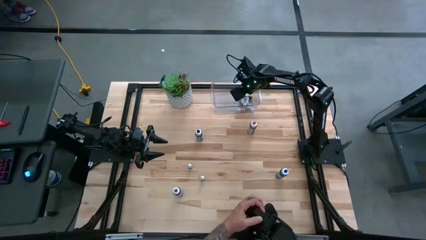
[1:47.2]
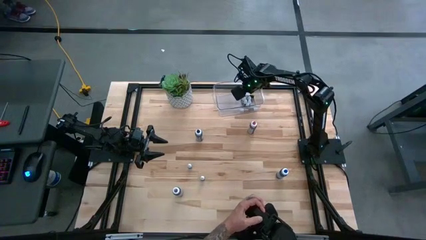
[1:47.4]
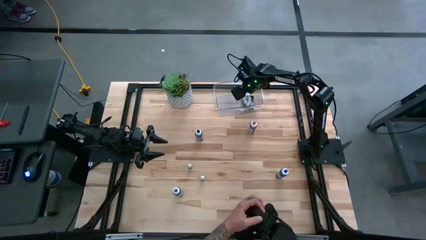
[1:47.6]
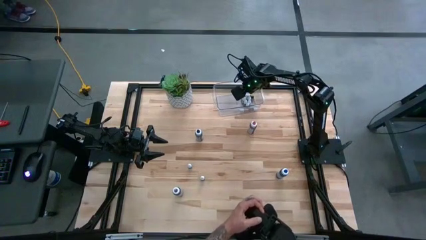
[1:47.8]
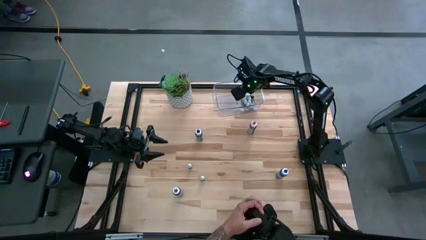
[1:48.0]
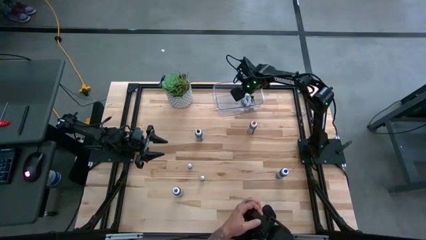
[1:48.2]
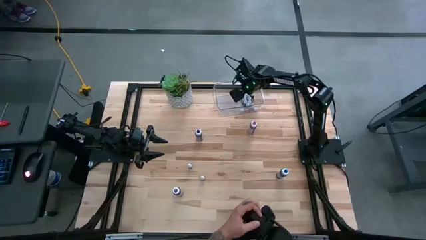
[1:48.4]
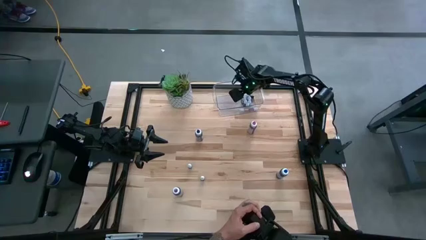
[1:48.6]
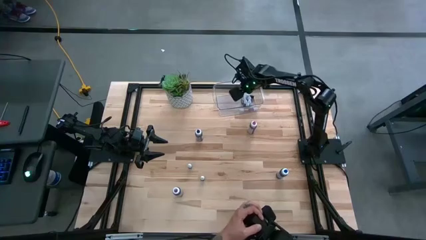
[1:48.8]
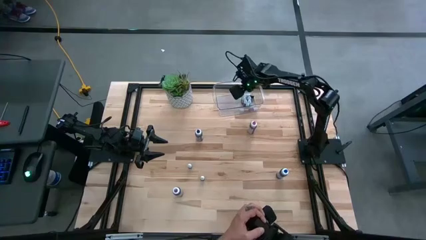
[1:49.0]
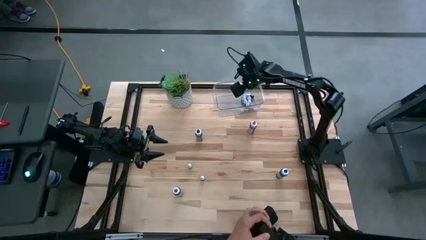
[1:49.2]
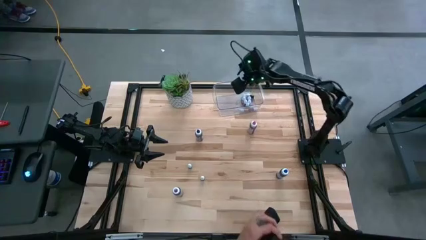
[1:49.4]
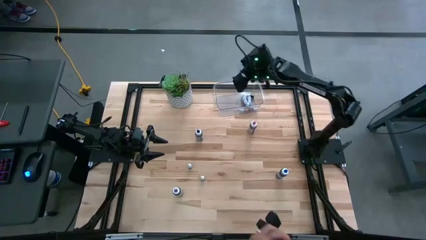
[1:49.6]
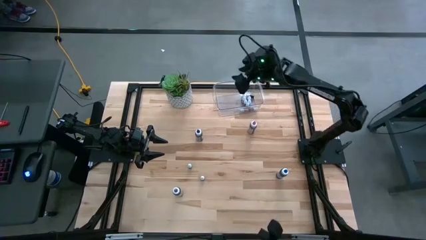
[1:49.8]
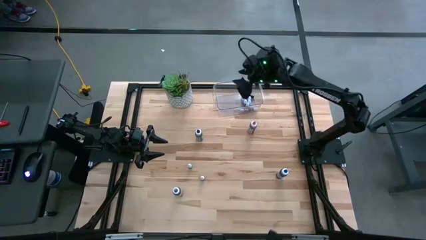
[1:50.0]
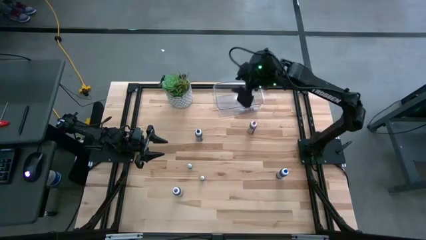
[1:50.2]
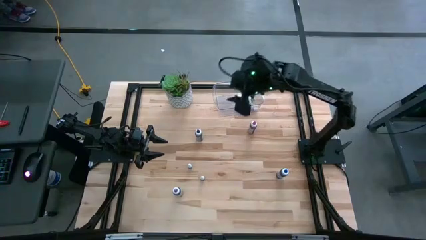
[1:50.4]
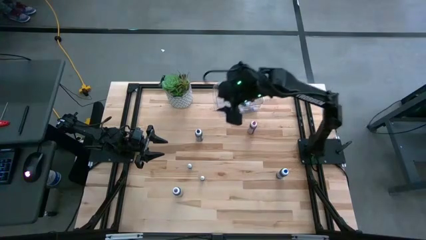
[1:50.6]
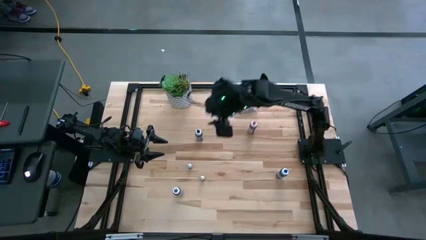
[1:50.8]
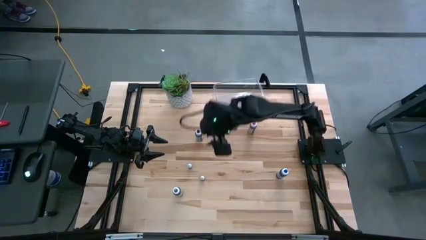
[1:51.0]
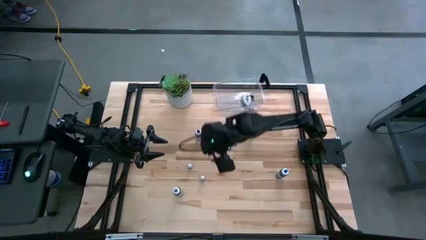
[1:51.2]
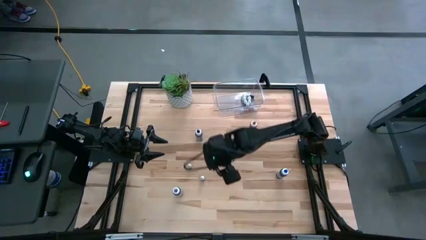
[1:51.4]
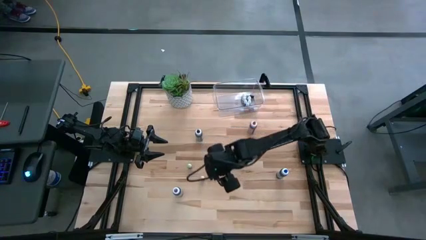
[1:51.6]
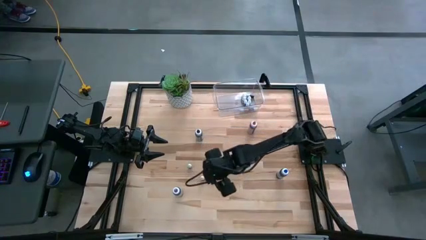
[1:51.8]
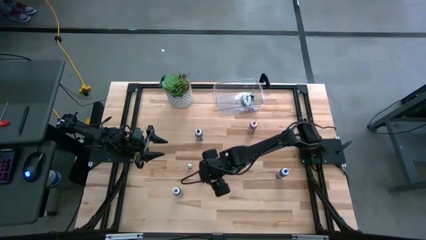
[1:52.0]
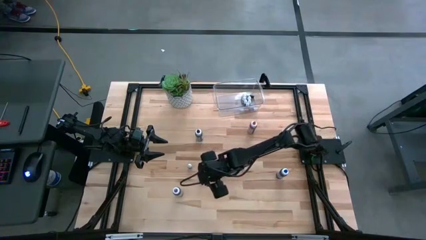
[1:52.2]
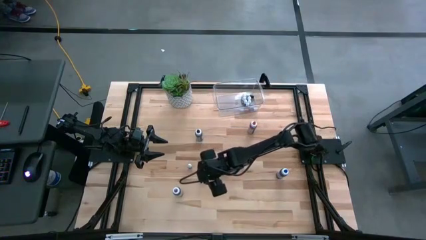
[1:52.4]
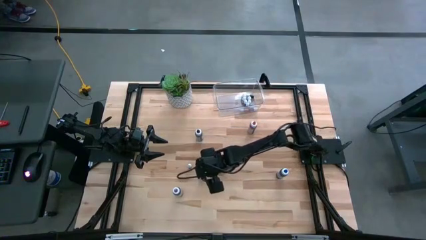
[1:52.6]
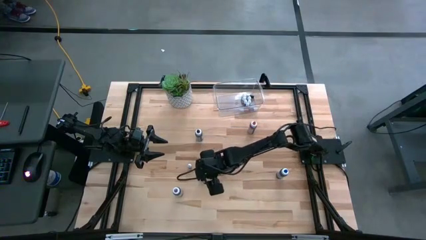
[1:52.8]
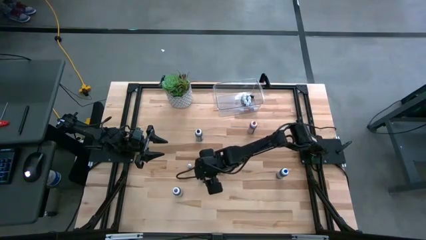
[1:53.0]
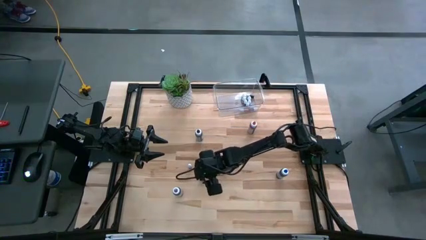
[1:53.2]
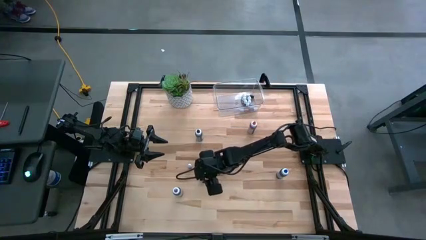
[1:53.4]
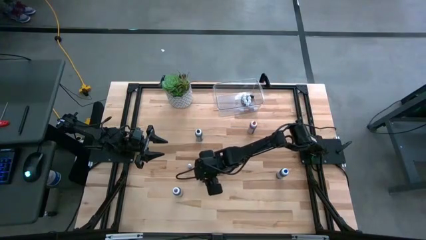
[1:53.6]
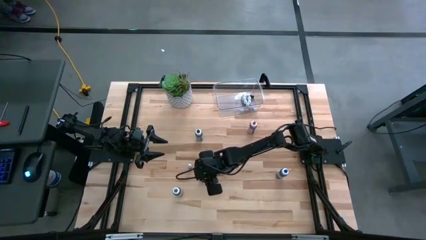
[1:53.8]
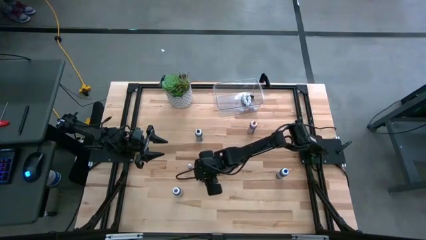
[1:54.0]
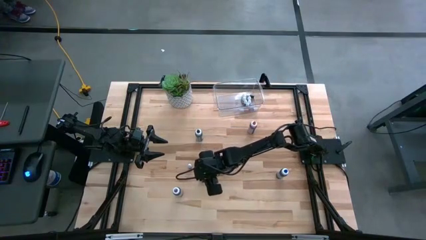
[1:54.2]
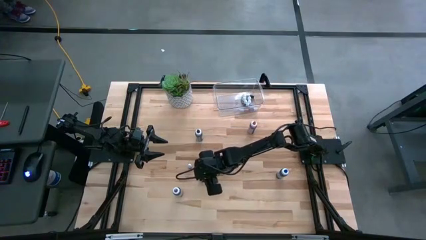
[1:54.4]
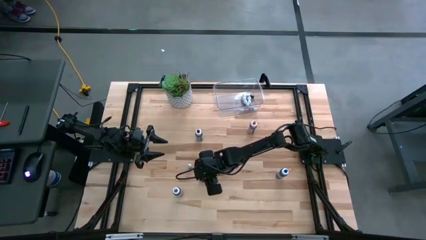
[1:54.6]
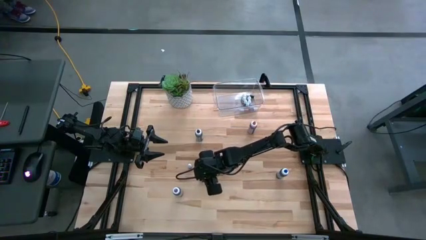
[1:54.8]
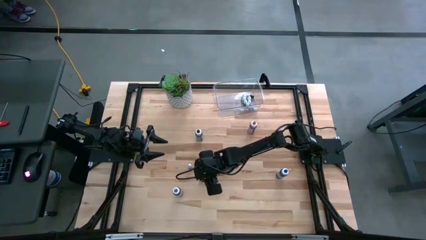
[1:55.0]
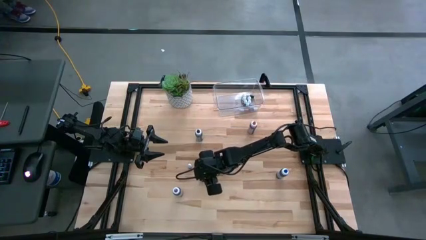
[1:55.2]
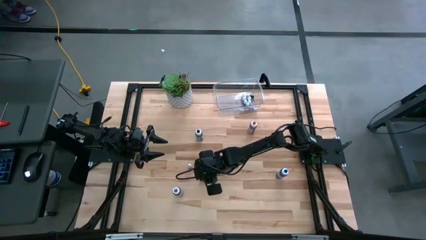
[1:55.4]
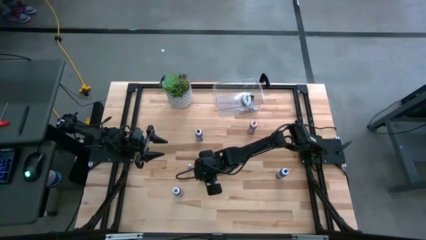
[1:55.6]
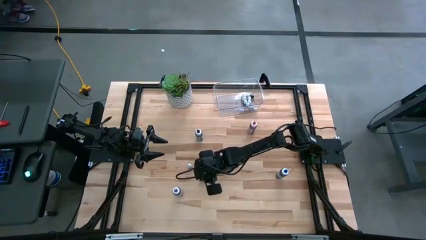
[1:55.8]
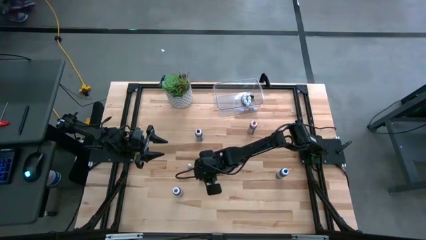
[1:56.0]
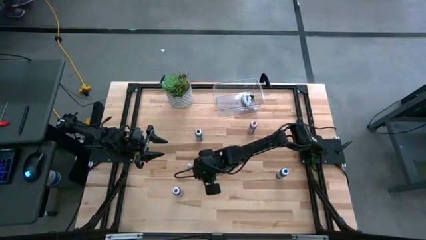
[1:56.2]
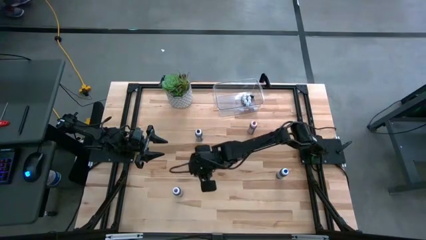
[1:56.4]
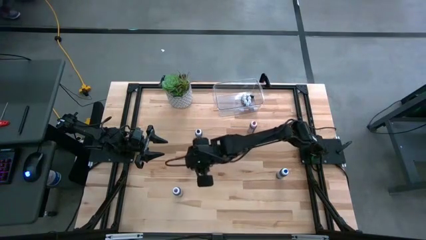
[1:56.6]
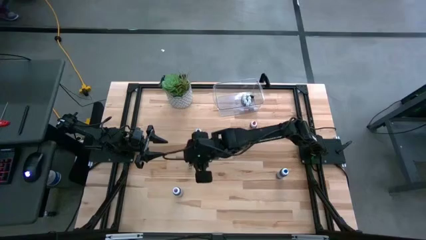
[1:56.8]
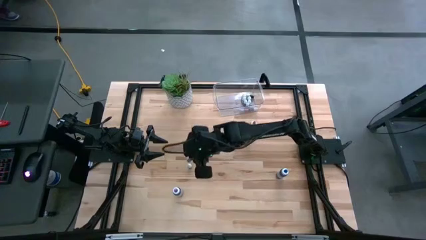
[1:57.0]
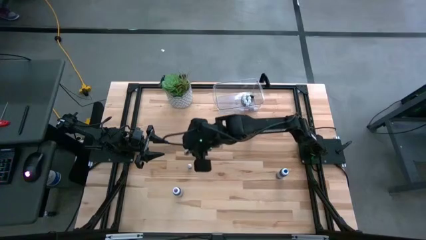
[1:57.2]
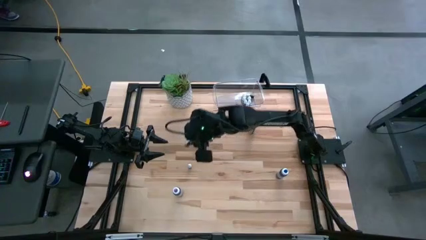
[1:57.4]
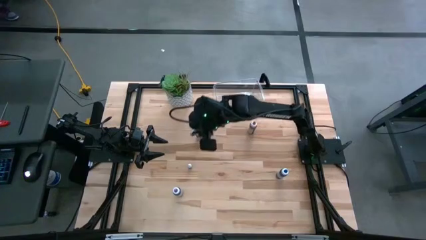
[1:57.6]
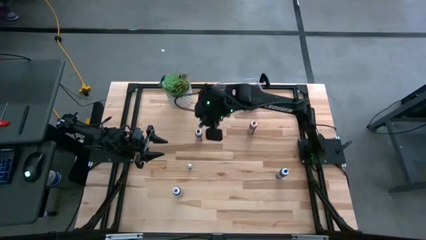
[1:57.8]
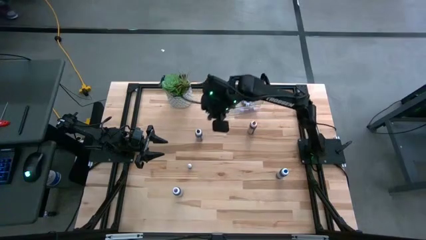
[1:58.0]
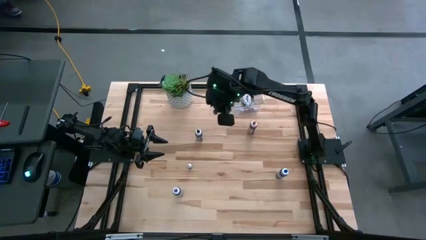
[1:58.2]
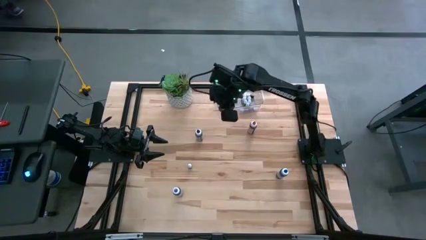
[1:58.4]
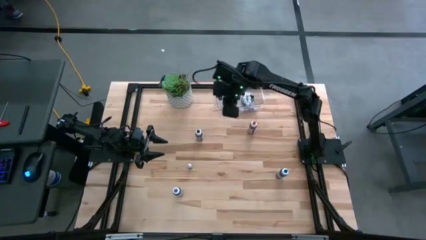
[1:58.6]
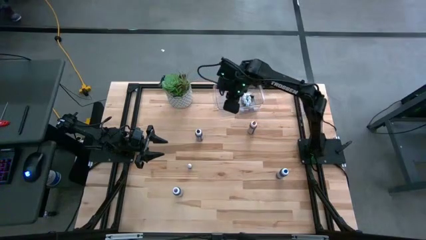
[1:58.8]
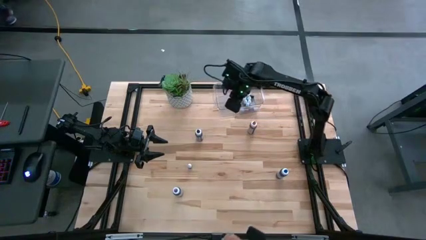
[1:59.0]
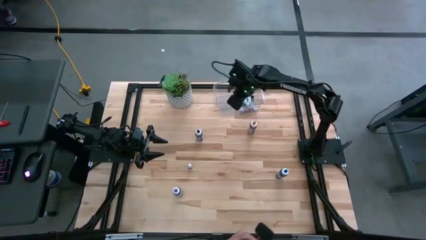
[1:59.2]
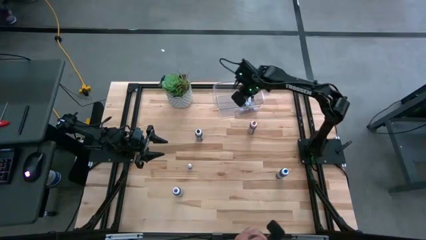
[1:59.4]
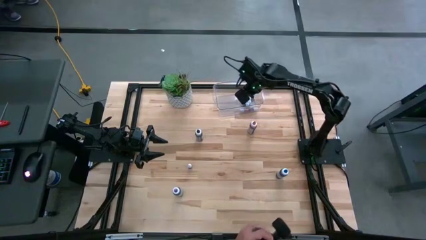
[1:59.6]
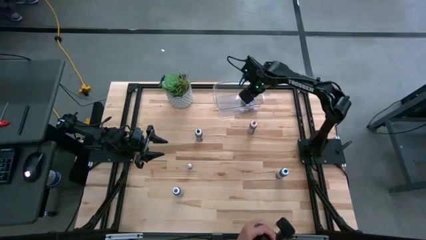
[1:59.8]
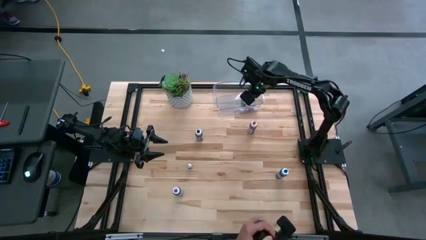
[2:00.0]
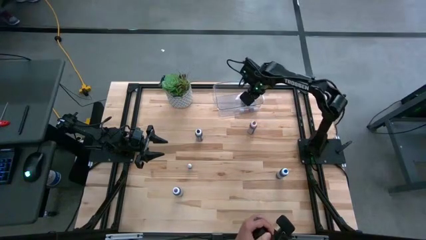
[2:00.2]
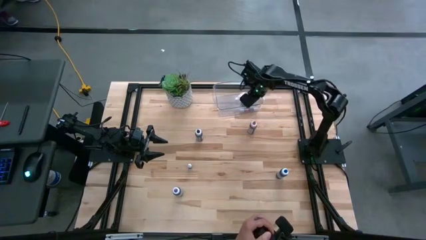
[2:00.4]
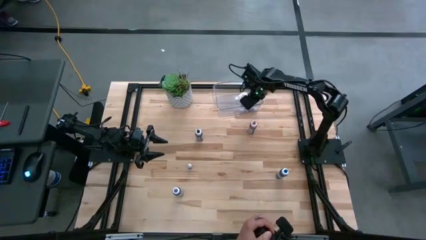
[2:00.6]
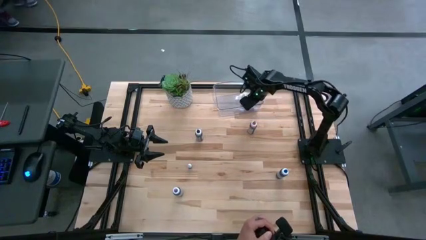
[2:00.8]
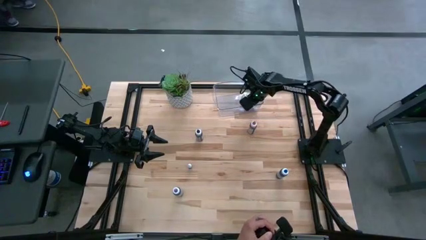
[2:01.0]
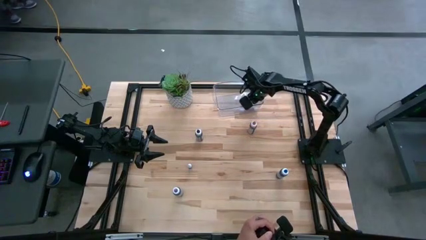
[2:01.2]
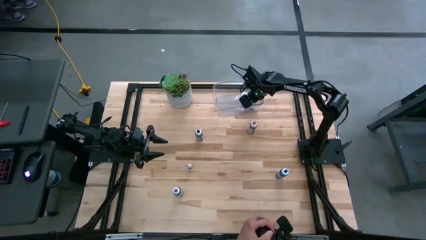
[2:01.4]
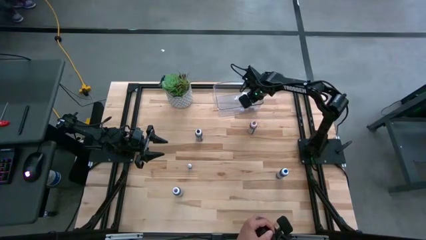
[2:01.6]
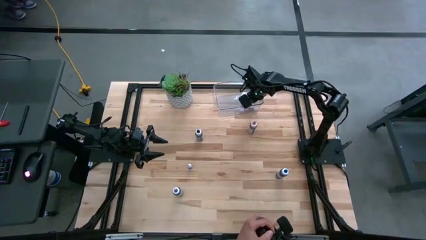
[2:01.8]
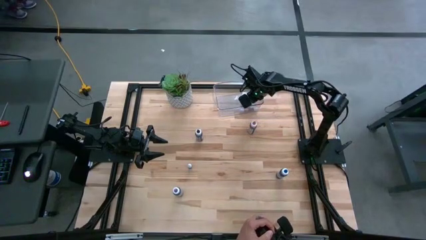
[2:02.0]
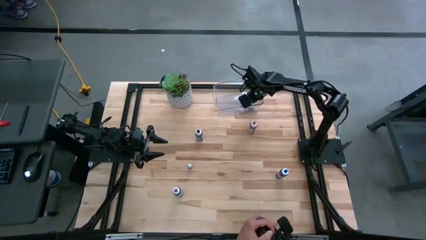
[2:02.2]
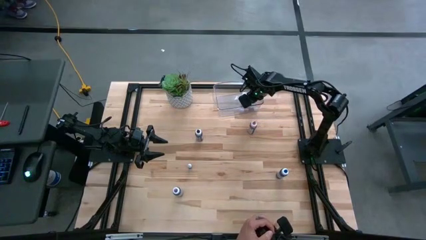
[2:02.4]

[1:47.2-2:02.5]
Task: Pick & Place food coloring
Put the small black food coloring bottle into the bin
